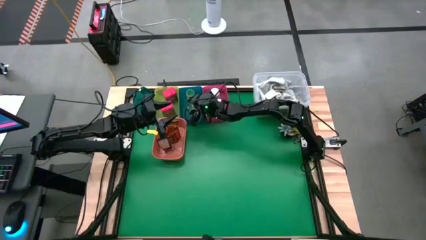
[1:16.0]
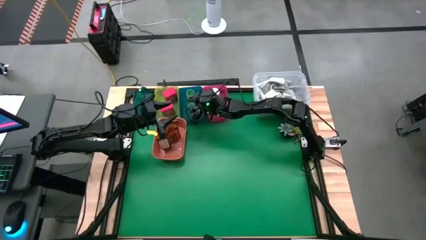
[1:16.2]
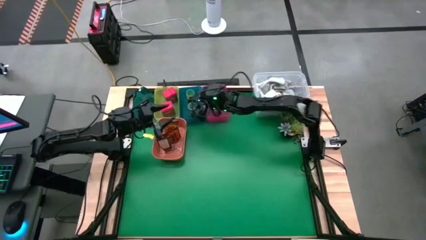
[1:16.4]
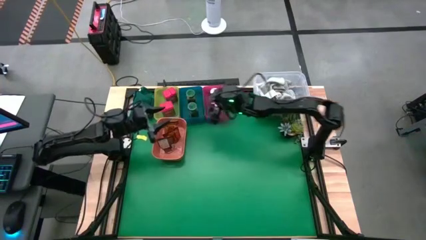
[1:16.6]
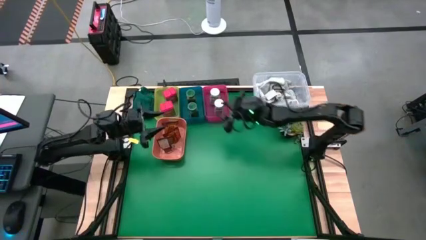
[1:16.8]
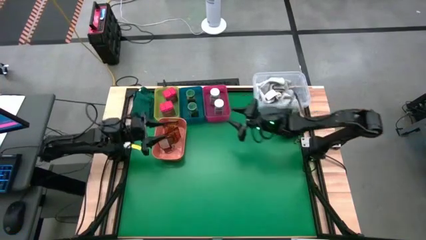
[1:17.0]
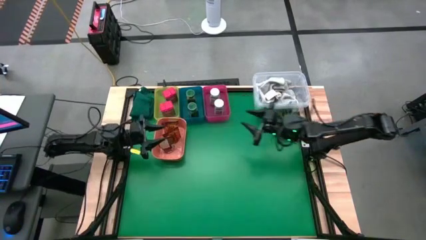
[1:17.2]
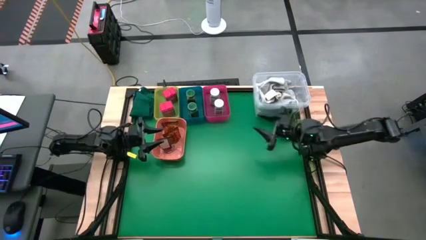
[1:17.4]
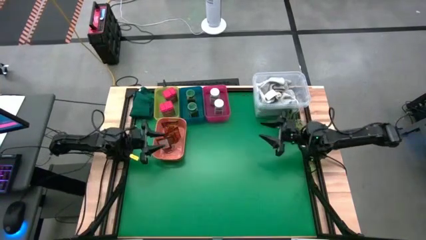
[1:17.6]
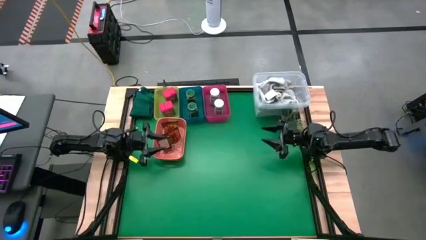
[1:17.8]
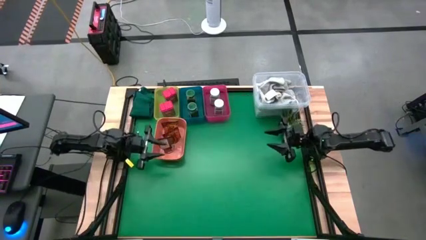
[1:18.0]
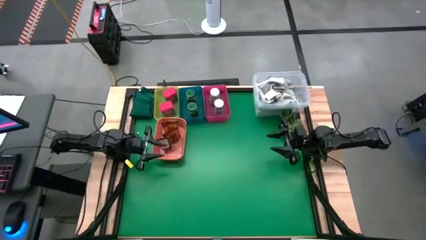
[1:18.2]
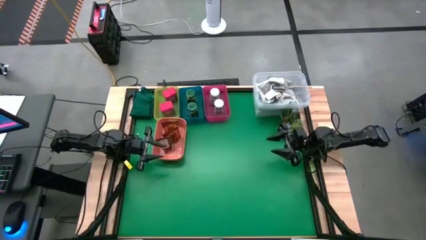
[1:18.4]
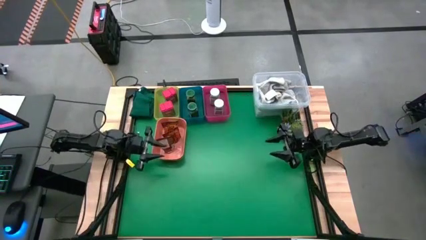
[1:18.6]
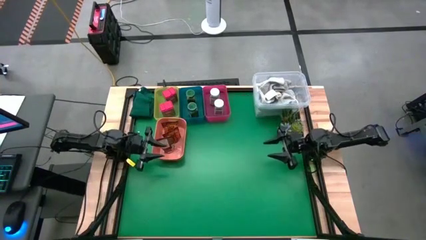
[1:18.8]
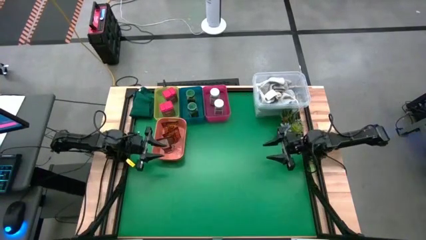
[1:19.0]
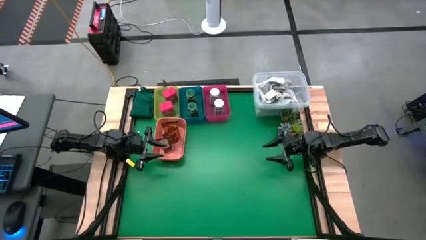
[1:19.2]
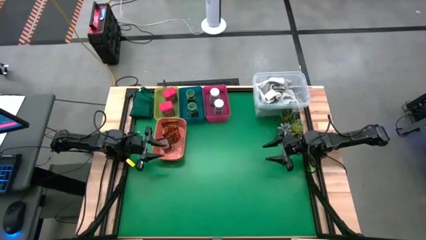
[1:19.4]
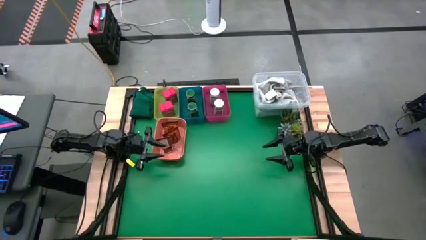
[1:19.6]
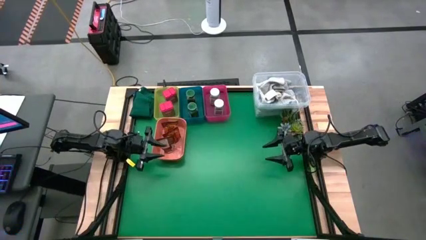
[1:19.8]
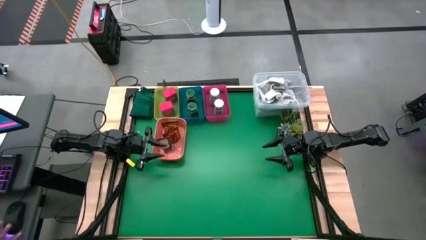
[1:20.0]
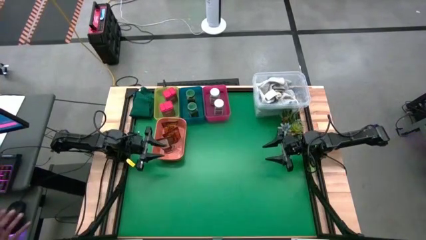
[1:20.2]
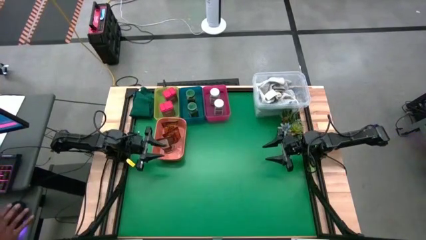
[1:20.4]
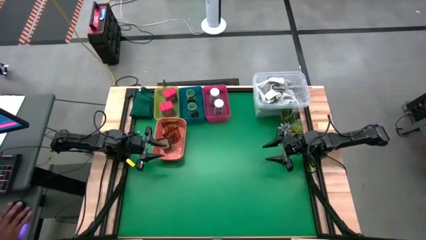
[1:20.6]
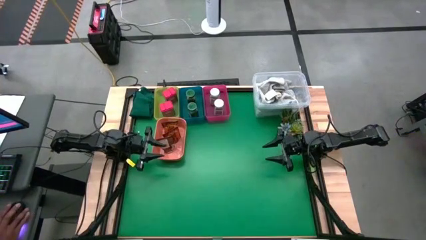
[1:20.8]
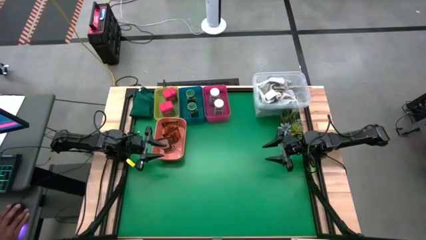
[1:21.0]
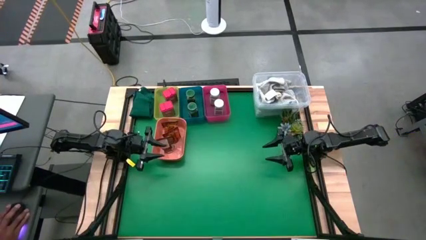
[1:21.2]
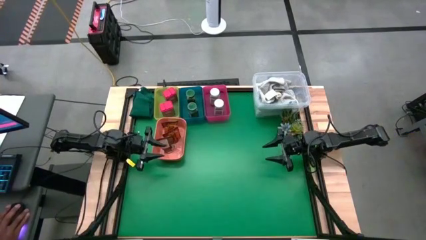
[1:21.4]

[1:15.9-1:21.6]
Task: Sort spices by type
Return to Home Position

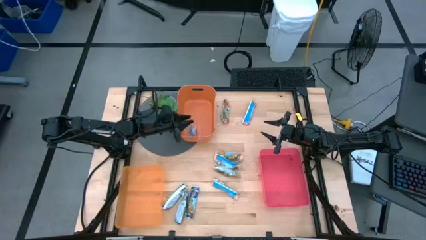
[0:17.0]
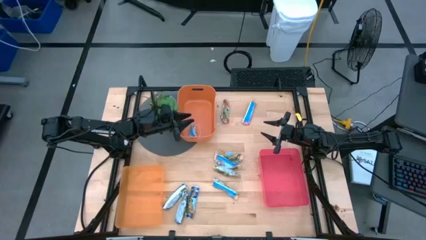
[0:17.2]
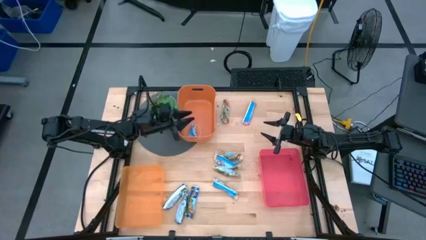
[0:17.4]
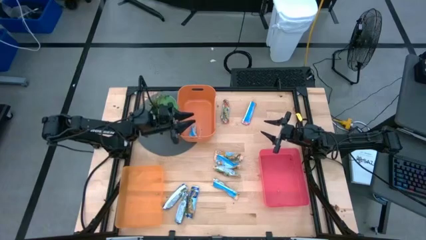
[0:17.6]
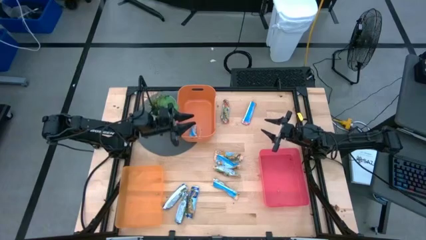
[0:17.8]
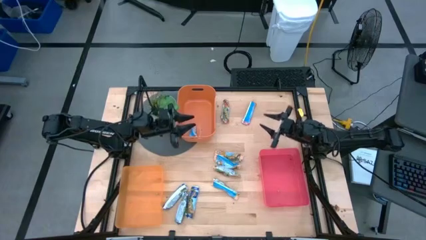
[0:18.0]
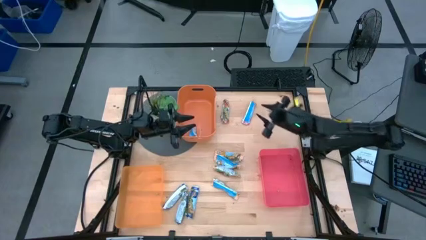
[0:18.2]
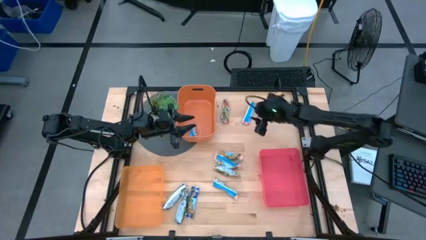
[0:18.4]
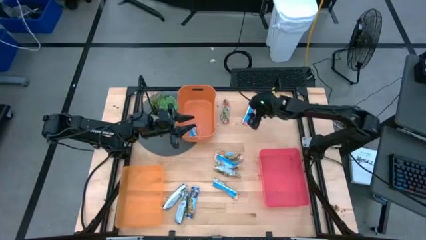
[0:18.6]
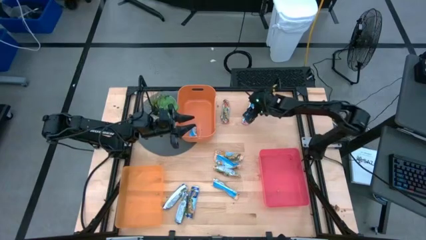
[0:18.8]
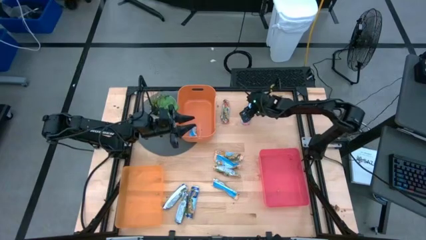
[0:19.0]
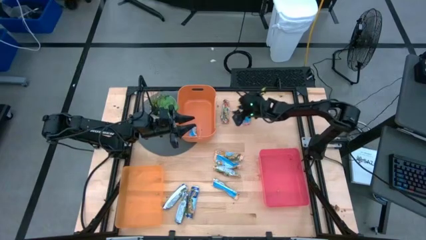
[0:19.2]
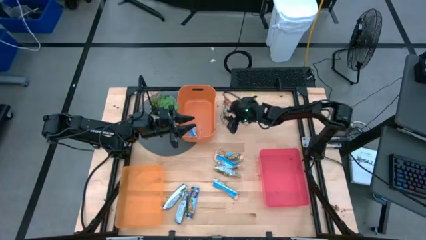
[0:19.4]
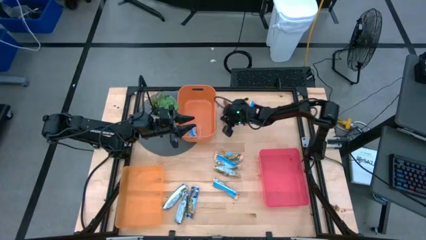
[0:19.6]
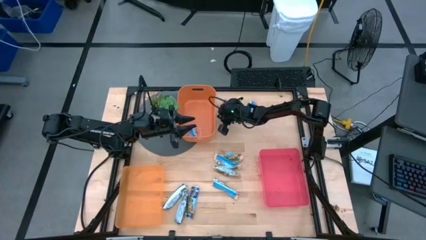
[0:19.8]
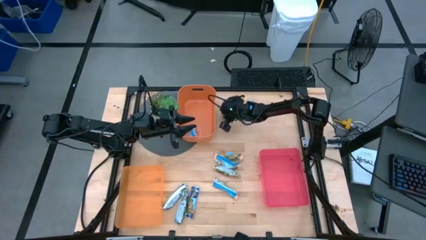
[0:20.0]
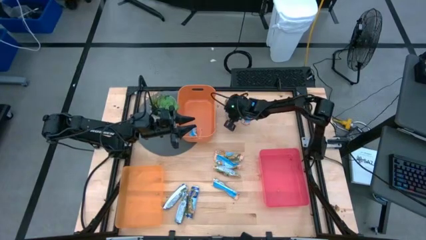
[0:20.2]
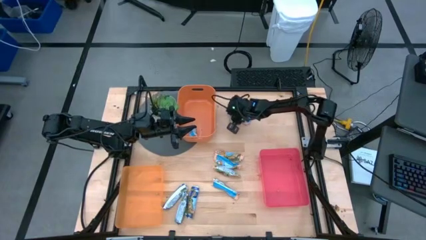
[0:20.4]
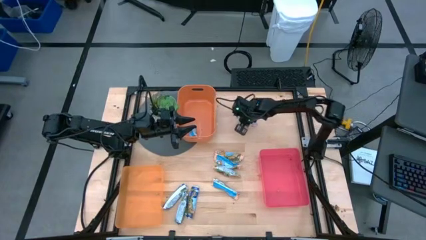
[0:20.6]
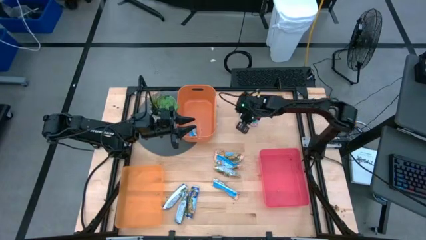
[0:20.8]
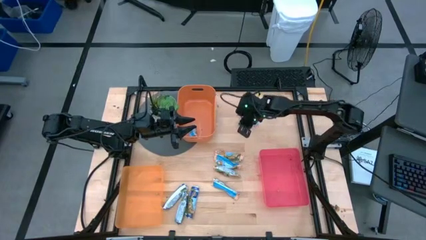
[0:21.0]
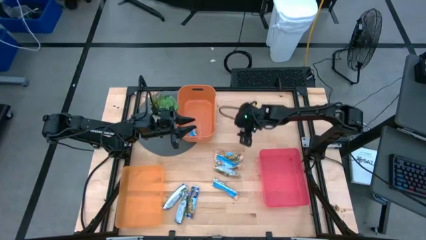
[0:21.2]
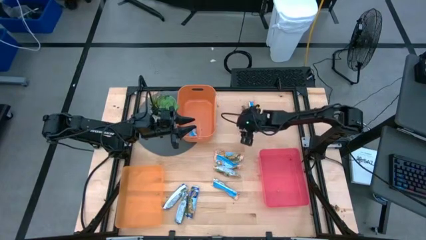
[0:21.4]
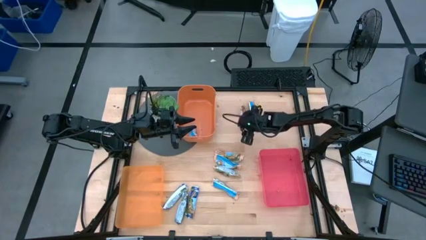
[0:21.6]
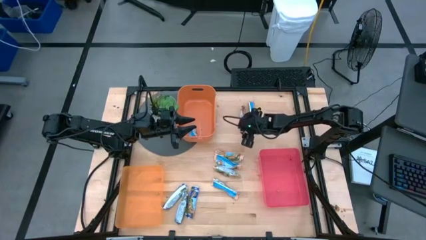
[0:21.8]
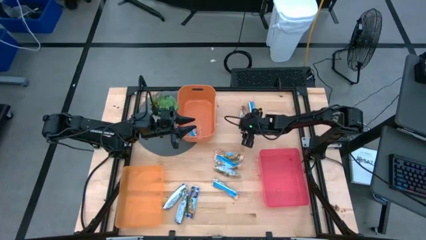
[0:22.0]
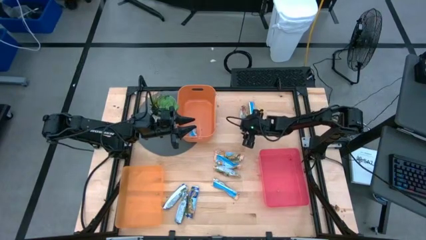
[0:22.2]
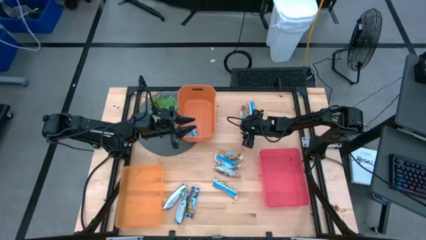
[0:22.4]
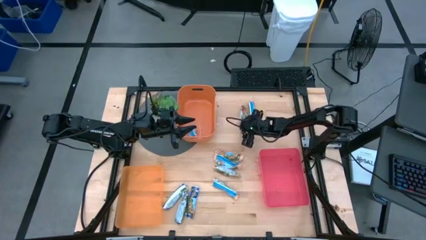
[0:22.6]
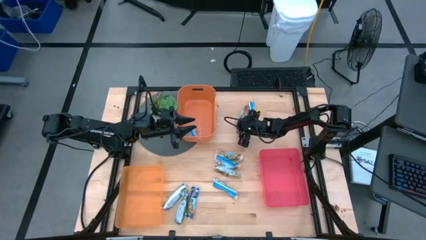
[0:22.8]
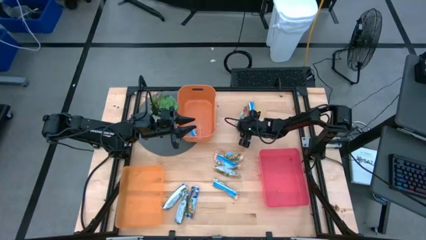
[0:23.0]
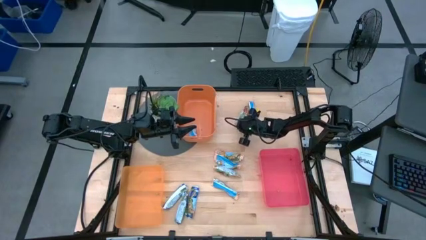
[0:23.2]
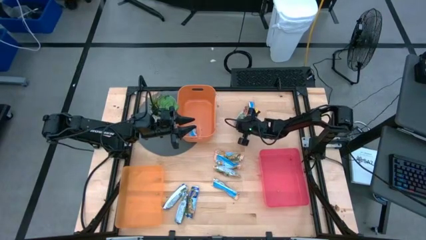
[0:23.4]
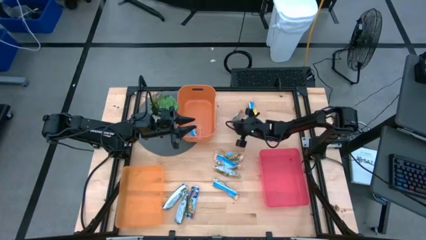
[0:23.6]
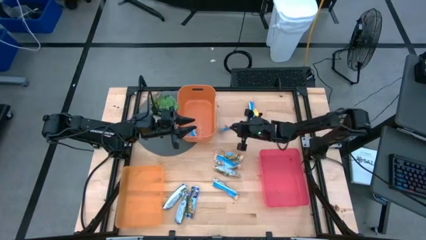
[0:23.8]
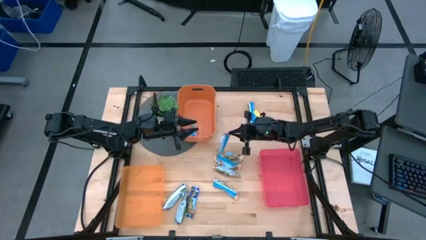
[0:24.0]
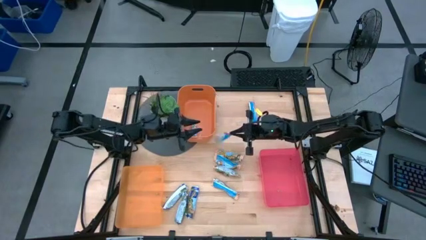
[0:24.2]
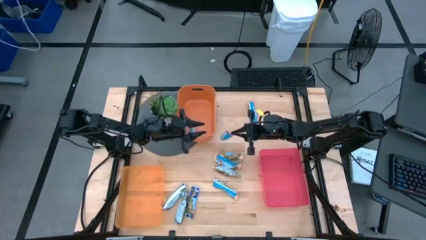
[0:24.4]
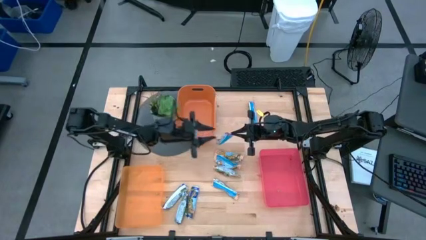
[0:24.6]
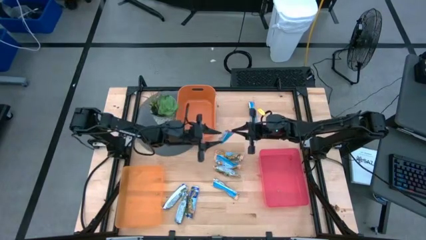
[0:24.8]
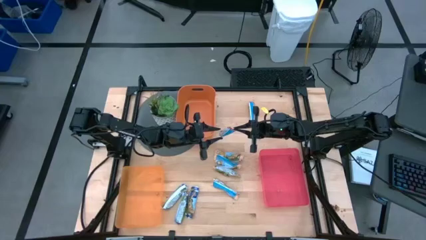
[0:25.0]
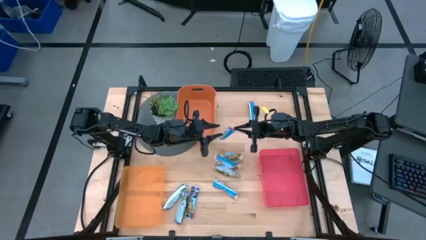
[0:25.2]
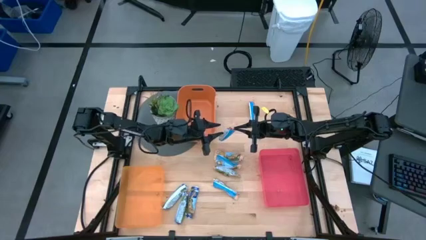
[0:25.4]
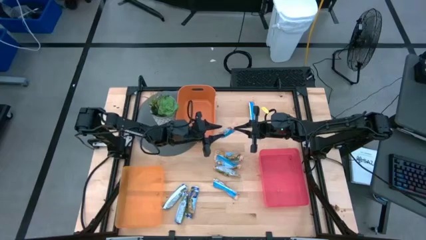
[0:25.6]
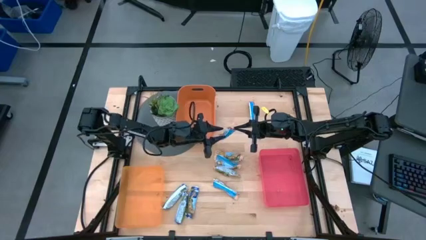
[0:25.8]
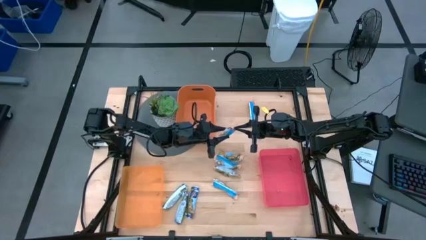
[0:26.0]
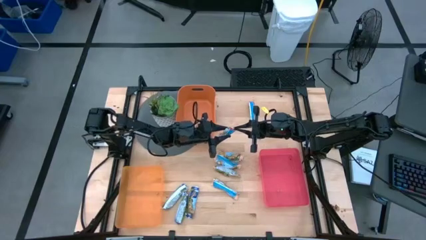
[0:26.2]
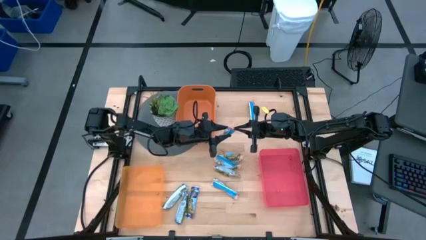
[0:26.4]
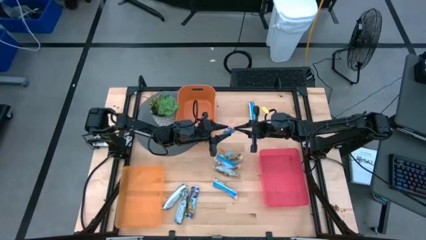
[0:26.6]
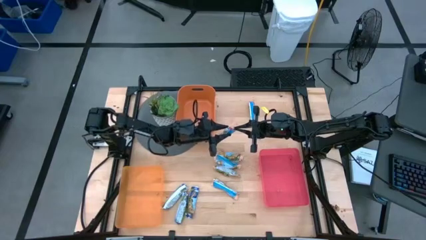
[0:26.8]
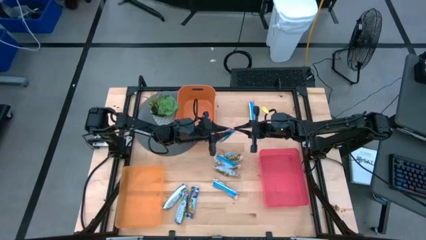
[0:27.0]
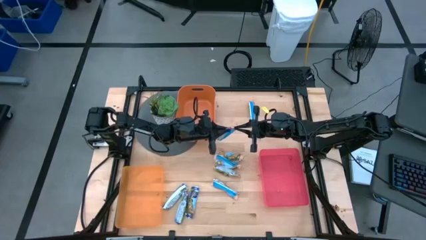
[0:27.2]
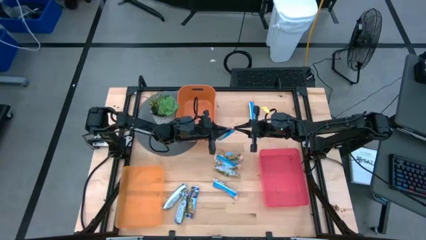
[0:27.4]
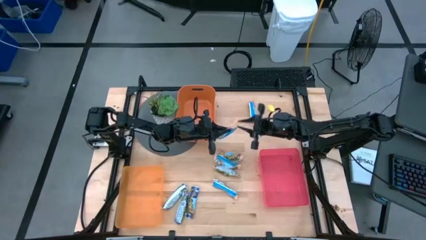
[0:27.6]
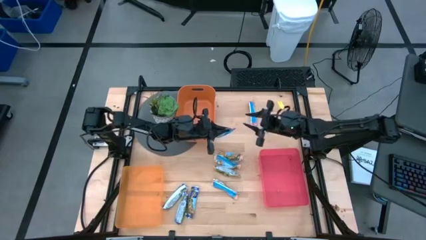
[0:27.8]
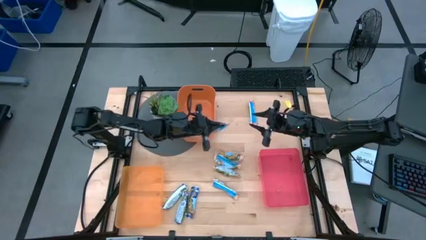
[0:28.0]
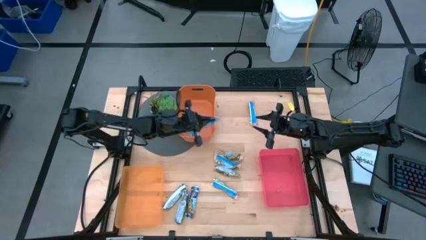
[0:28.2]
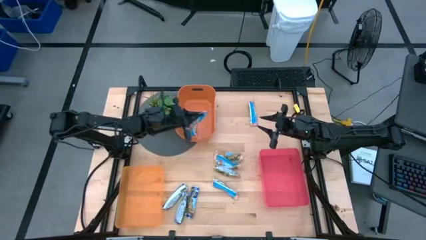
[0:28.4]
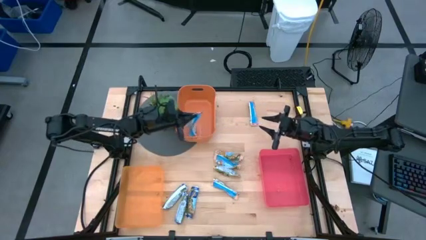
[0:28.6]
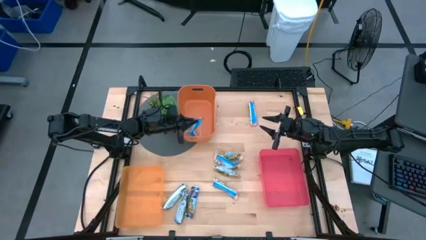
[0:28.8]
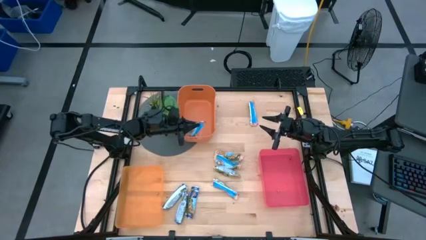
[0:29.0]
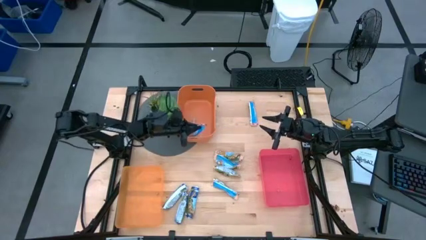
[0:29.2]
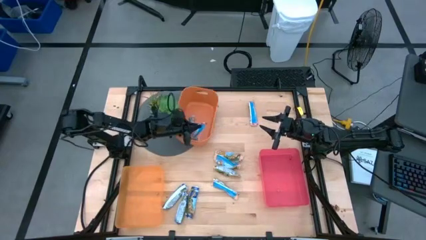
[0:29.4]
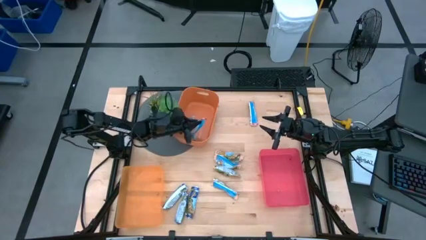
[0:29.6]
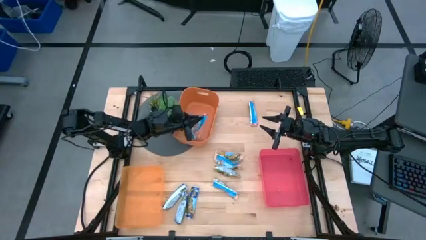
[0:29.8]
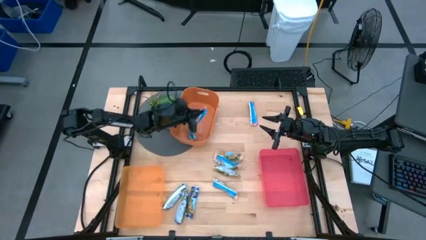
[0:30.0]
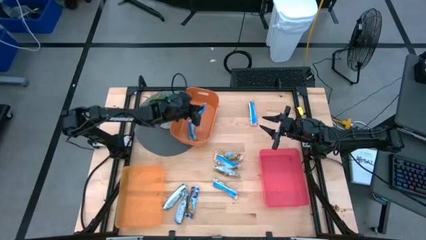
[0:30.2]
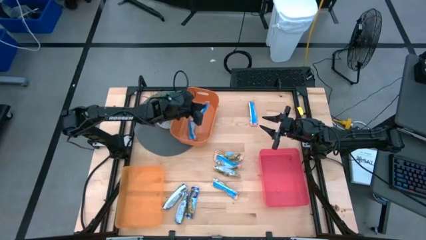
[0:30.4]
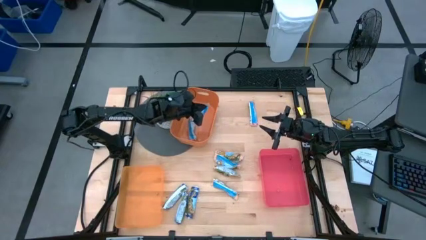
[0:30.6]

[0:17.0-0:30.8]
Task: Pick and place Granola Bars by type
Put the red granola bar into the orange bin
